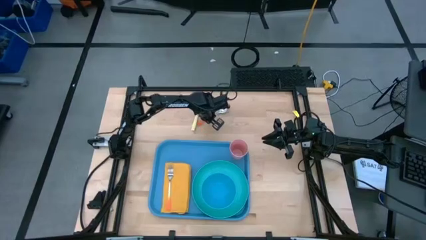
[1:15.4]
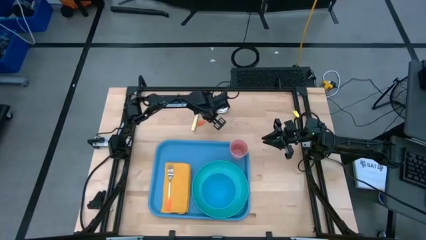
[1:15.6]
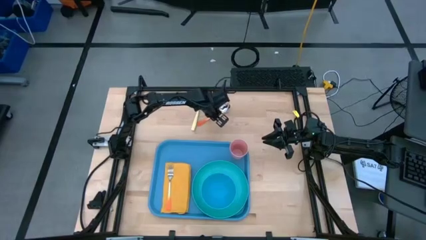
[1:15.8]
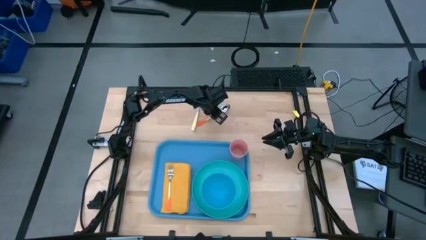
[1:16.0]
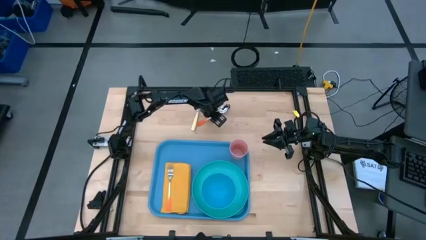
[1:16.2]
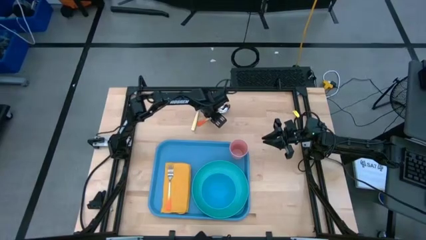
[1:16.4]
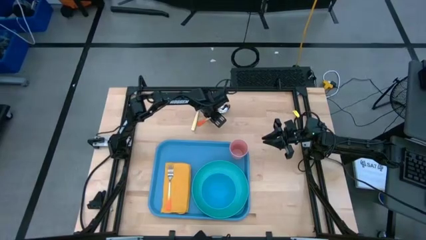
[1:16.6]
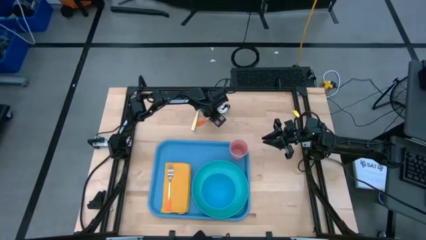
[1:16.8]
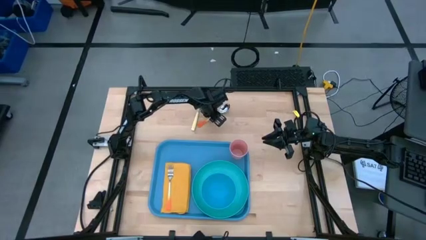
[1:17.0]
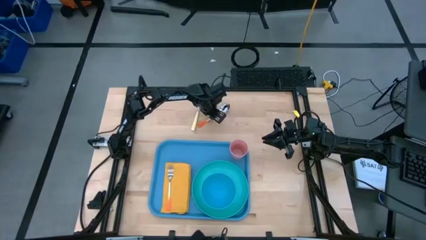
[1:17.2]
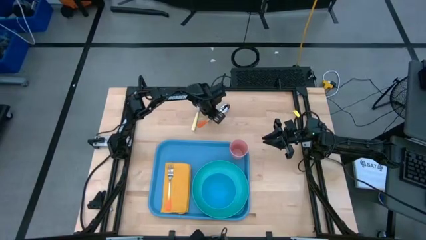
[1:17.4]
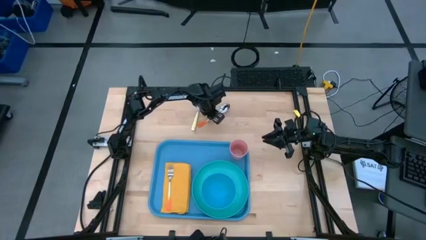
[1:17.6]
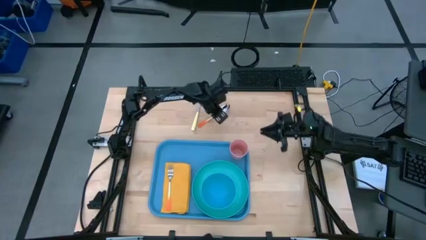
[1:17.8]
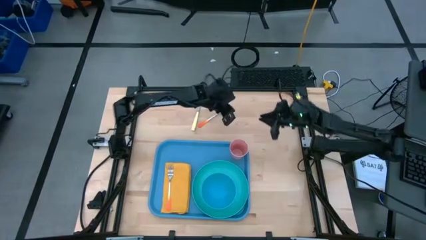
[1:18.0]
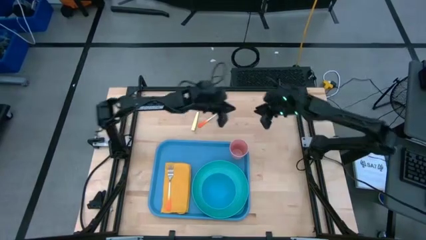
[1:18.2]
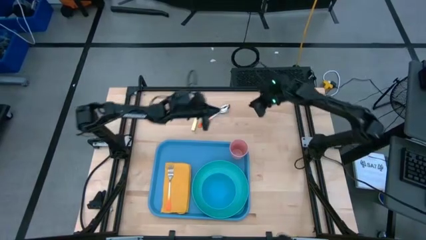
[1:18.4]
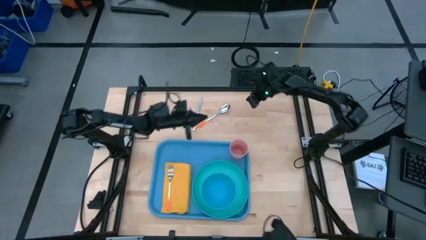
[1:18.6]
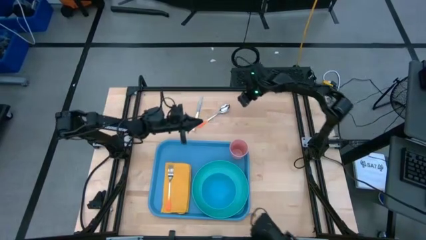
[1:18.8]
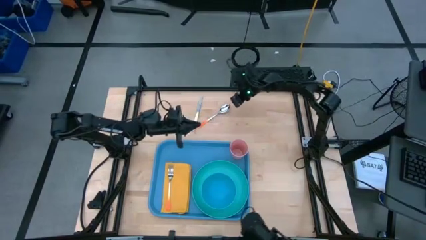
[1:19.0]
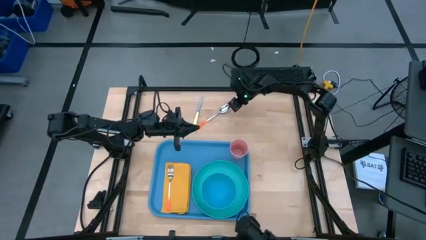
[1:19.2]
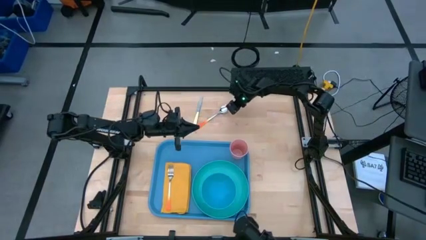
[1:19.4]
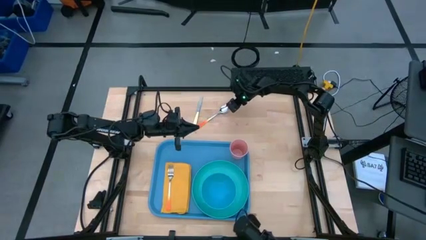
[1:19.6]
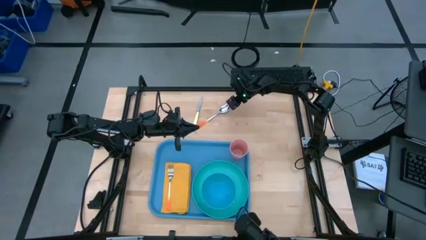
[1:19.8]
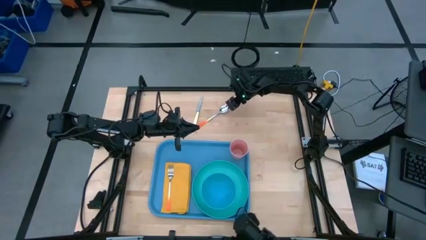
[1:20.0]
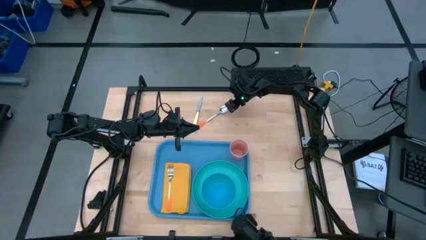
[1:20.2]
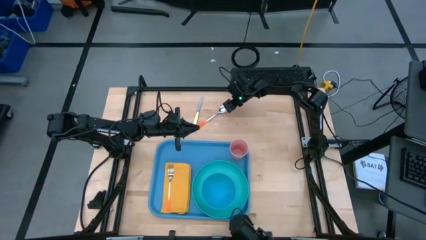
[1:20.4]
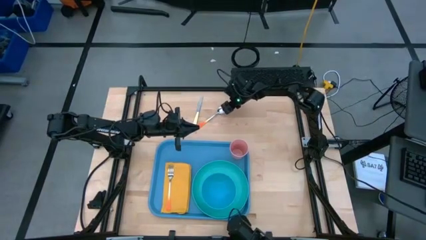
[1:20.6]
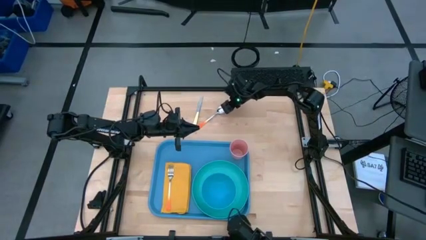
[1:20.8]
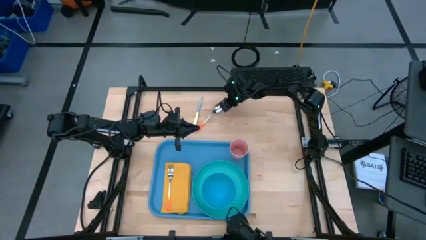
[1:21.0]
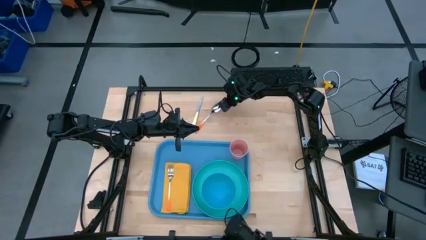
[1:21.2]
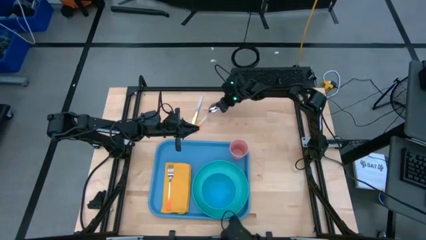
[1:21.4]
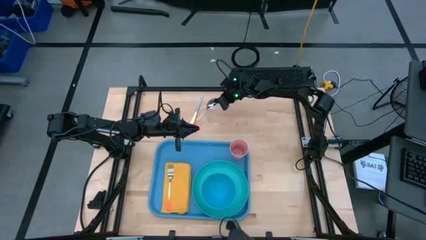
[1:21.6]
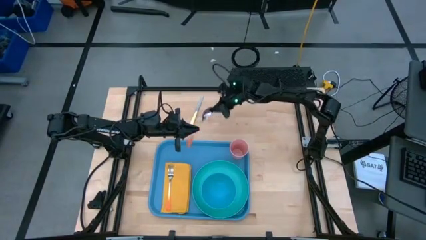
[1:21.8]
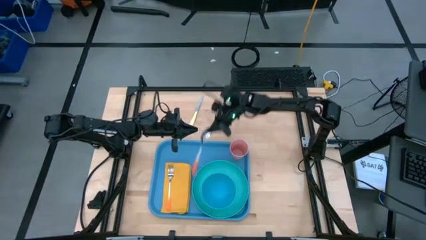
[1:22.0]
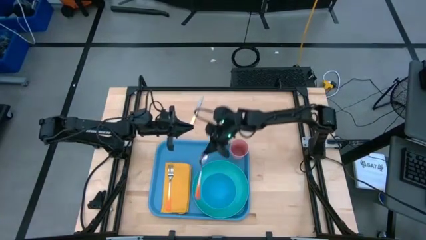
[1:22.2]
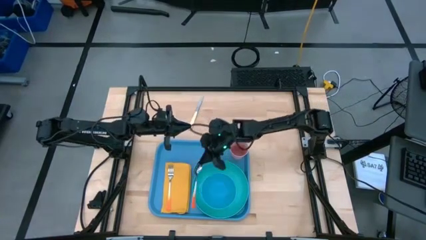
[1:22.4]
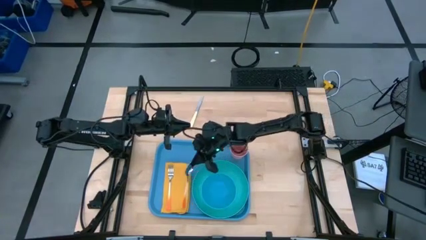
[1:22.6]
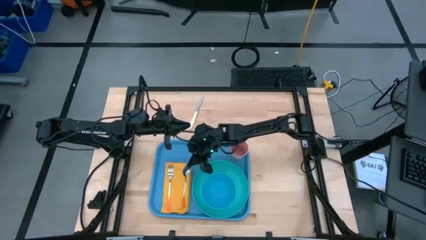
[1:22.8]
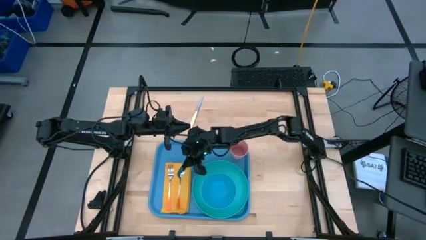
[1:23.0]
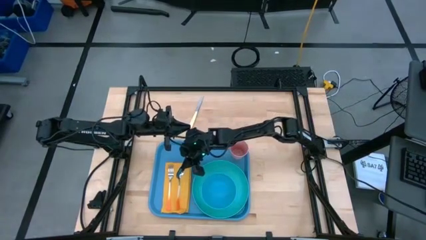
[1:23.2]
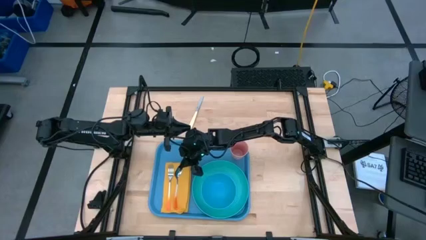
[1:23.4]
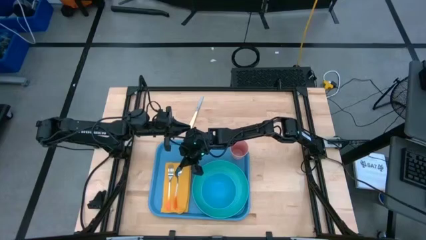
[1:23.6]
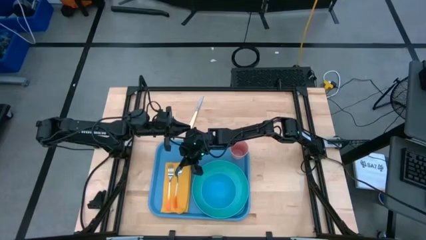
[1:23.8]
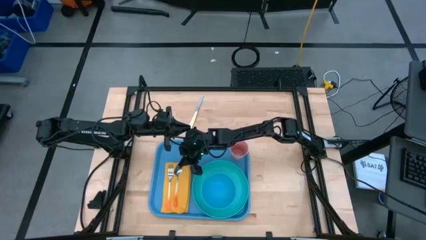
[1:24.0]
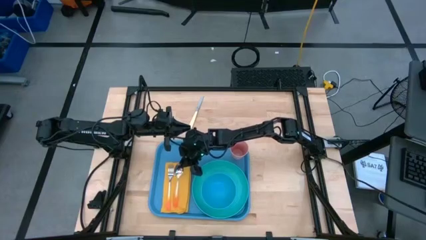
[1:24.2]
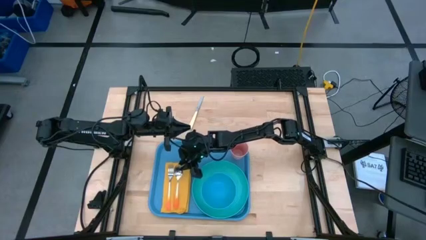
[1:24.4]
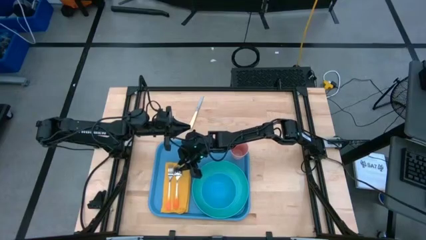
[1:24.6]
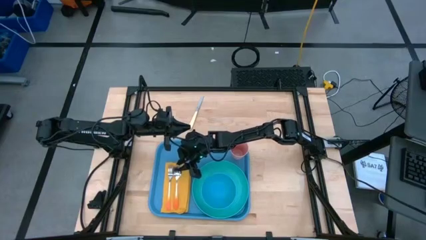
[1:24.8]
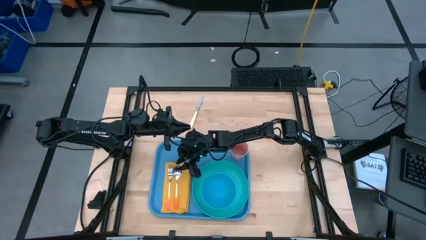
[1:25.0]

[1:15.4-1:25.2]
Task: Set up tray
Put the orange spoon on the yellow napkin to the right of the orange fork

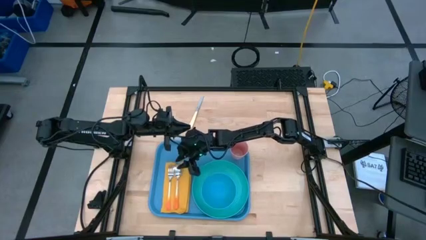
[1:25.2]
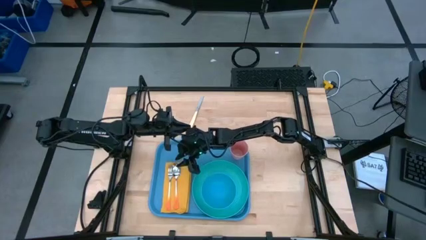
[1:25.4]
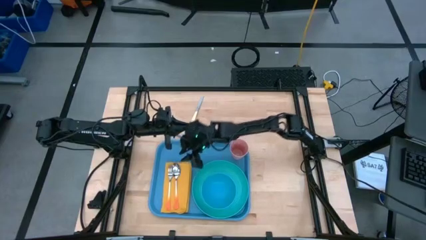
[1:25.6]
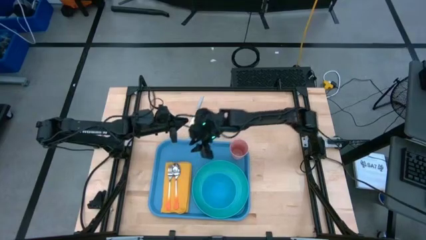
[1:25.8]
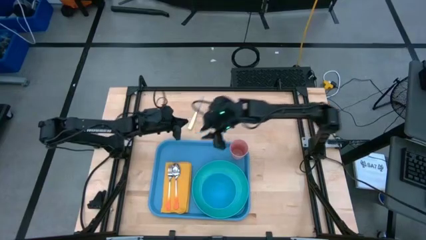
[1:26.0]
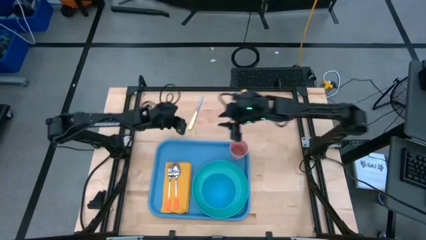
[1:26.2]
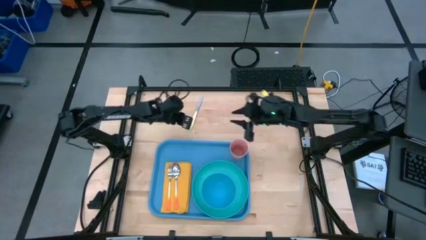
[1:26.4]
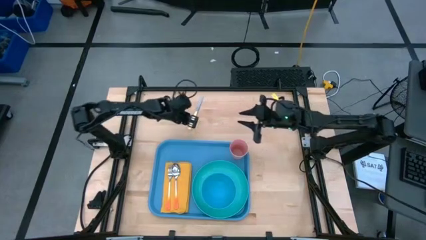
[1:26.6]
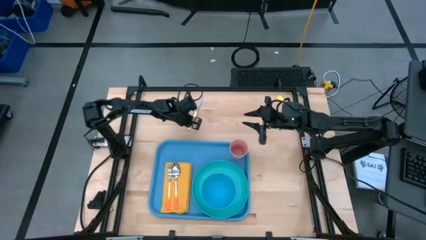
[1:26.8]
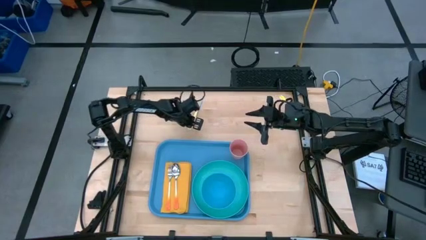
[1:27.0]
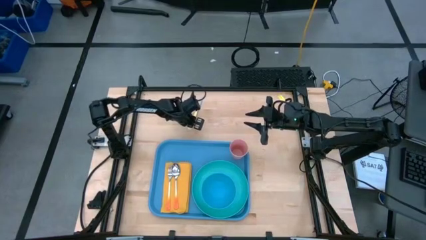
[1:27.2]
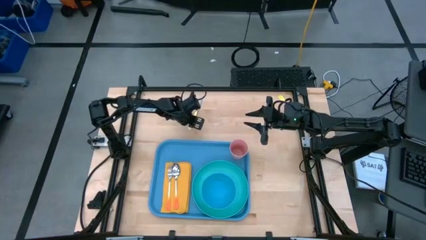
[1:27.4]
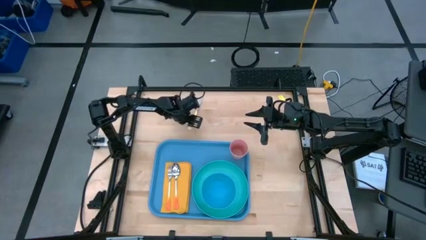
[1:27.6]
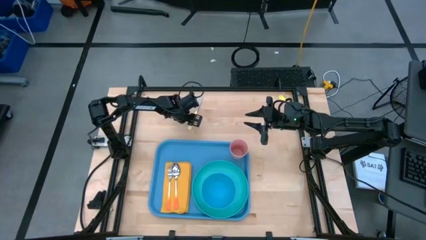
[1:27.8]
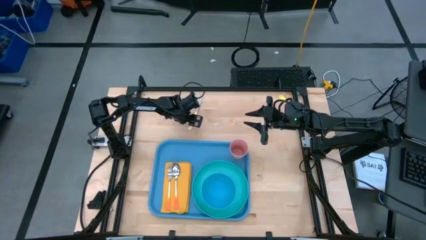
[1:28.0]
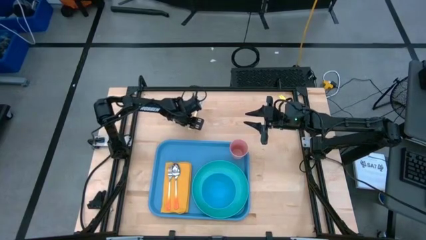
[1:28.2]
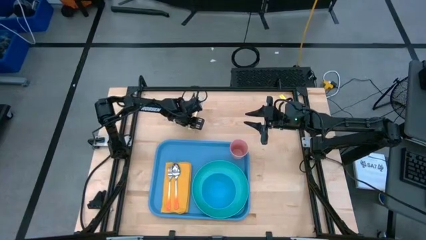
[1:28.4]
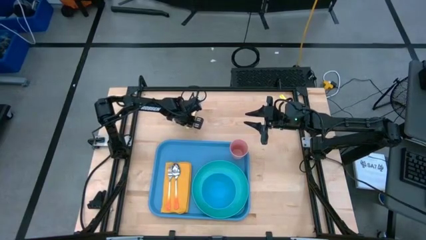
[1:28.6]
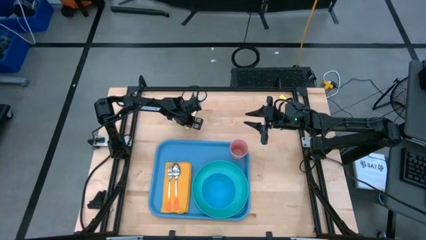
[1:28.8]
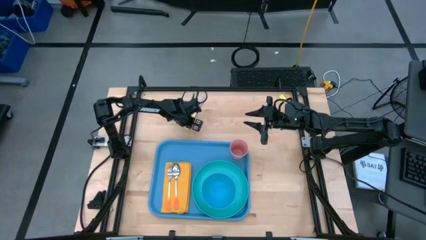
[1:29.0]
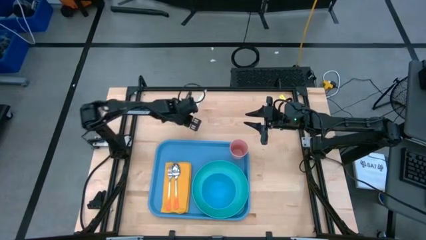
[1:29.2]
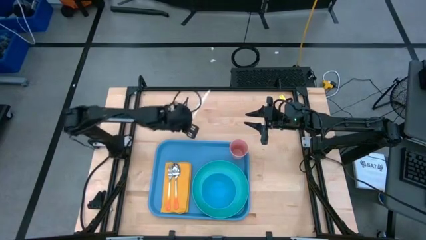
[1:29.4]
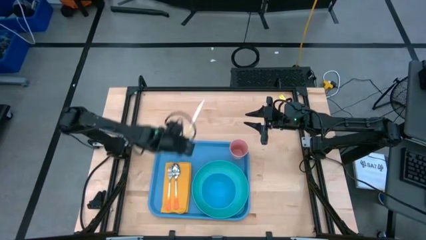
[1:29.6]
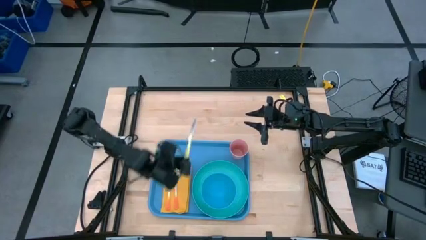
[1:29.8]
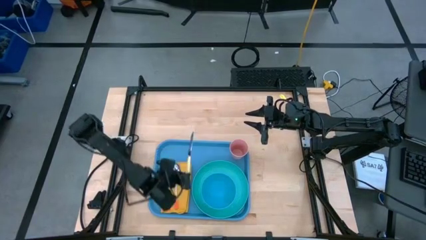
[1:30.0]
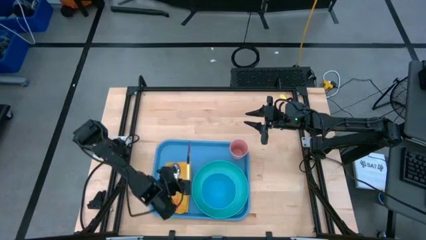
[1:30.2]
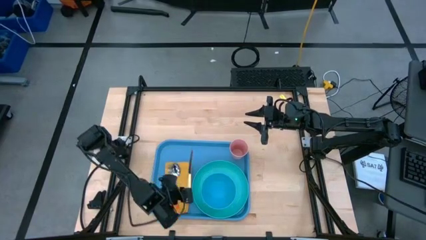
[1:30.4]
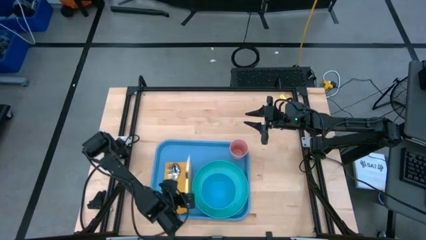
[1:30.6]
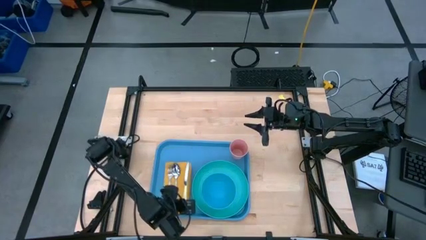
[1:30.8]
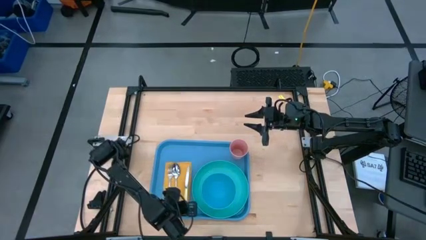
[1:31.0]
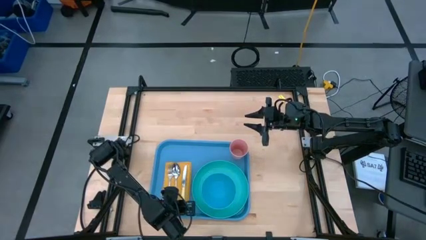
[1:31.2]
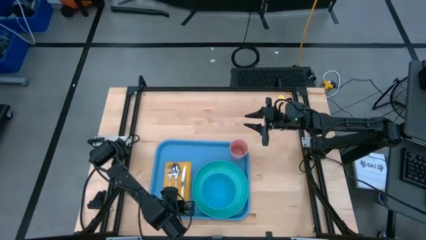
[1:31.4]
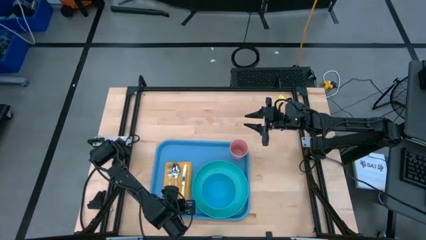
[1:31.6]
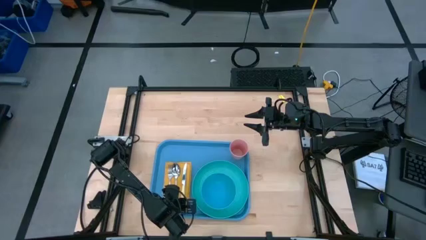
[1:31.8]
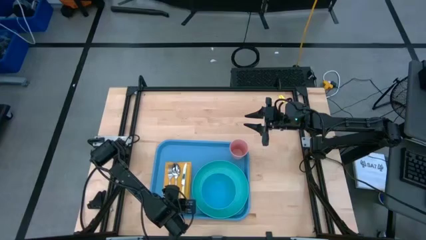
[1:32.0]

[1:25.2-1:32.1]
Put the yellow knife on the yellow napkin to the right of the orange spoon
